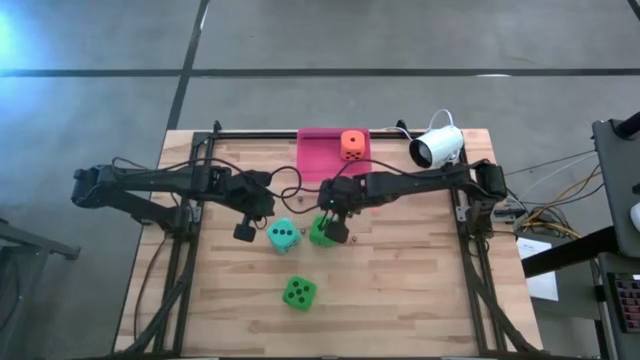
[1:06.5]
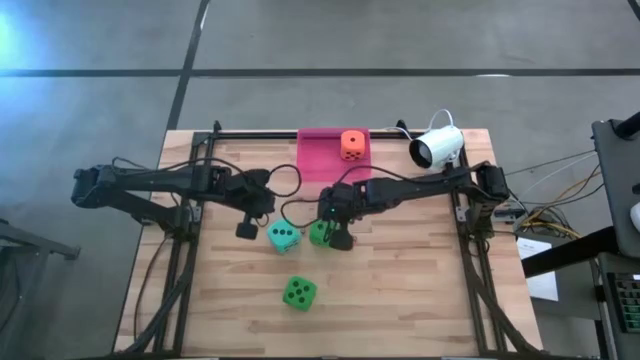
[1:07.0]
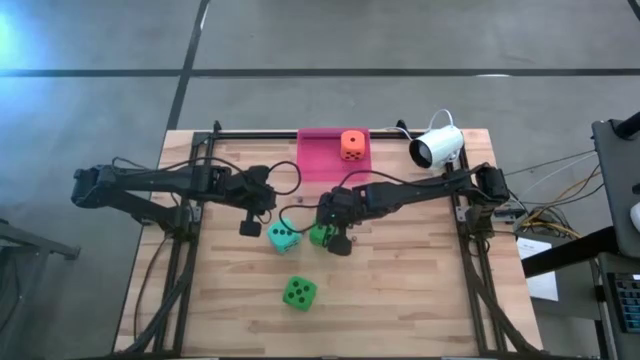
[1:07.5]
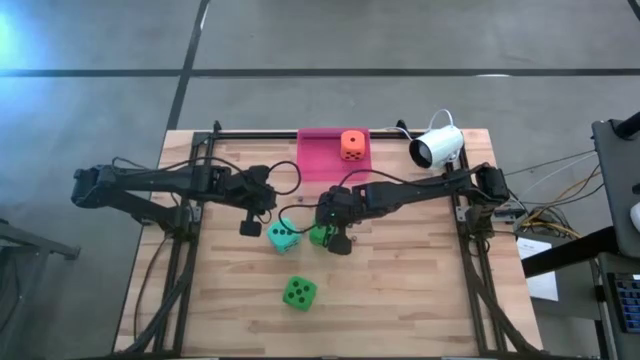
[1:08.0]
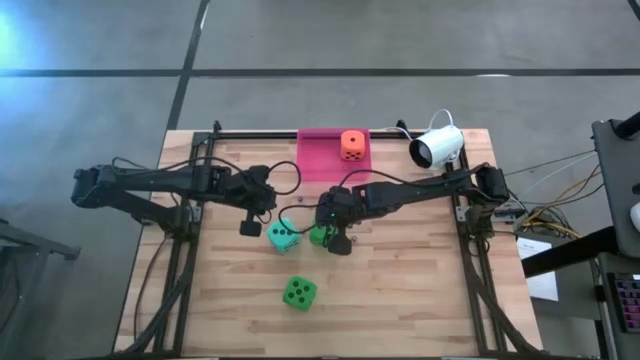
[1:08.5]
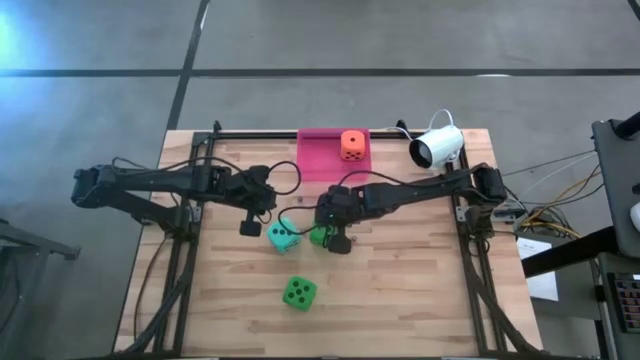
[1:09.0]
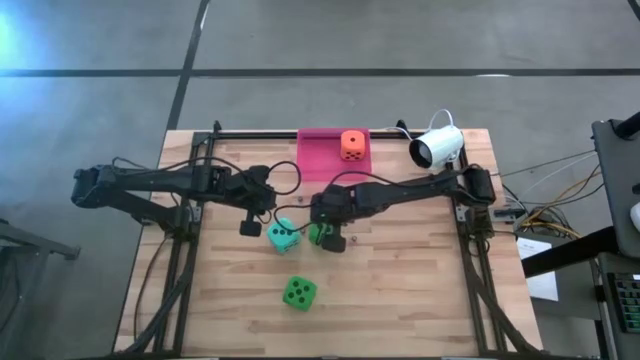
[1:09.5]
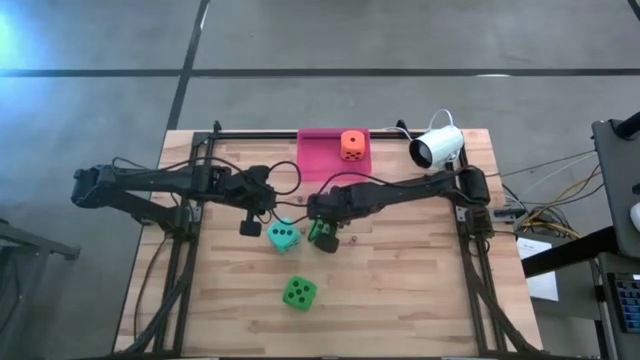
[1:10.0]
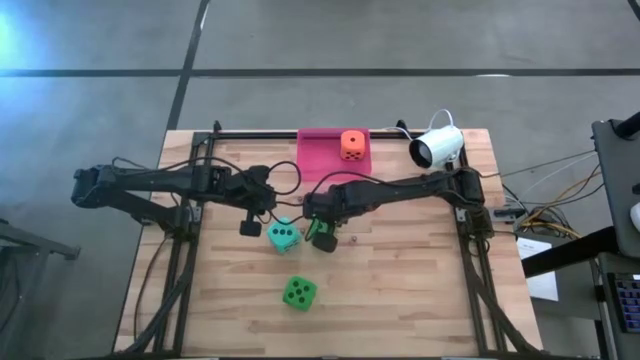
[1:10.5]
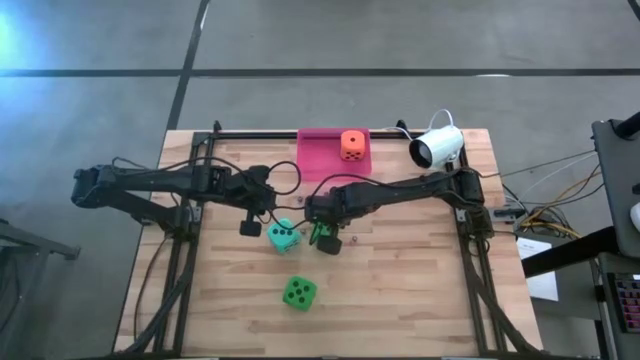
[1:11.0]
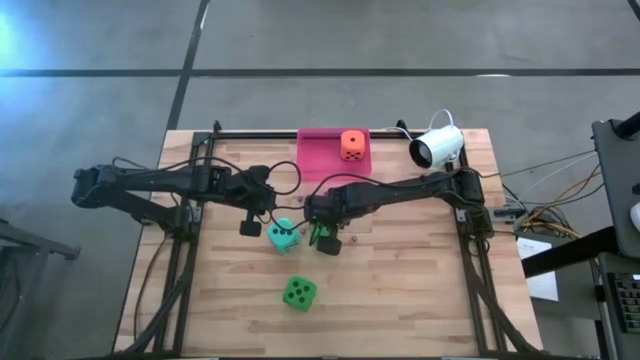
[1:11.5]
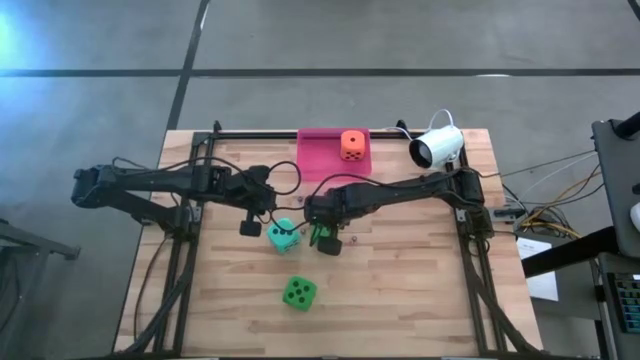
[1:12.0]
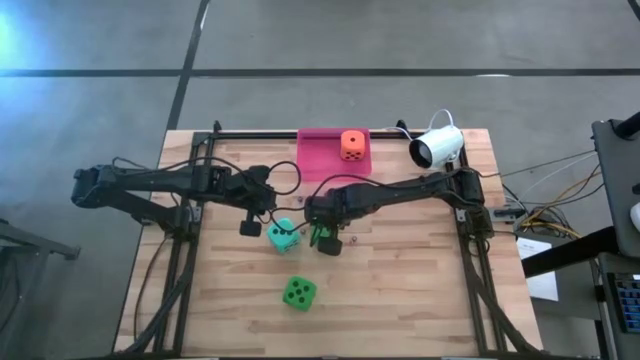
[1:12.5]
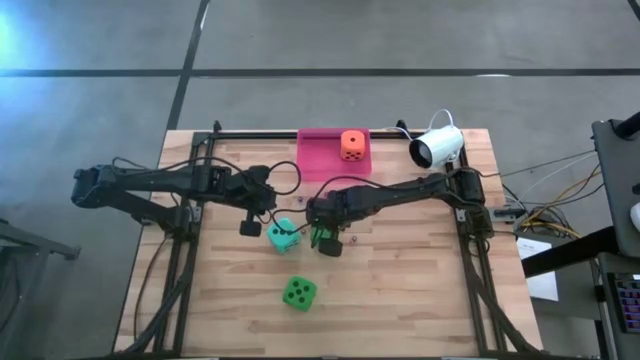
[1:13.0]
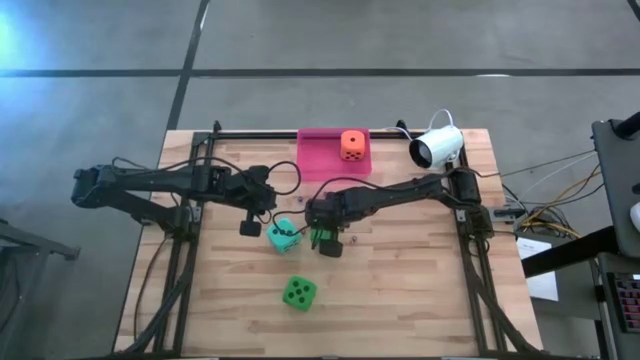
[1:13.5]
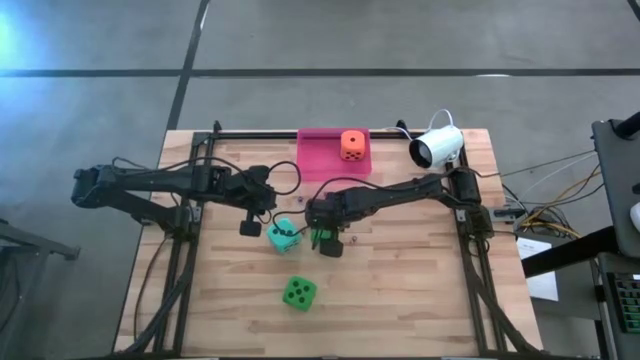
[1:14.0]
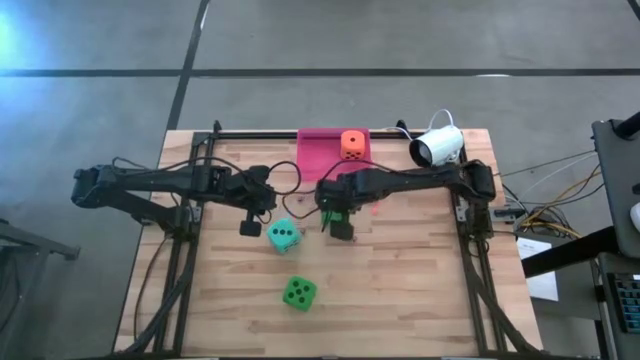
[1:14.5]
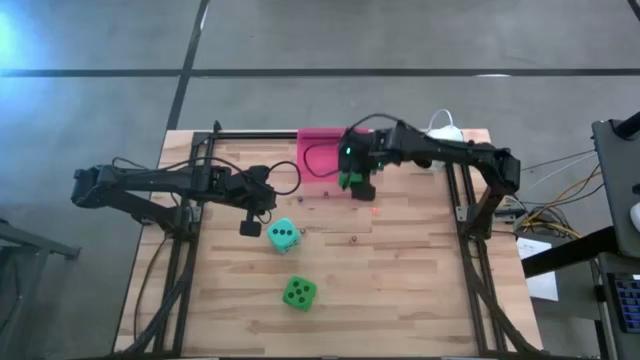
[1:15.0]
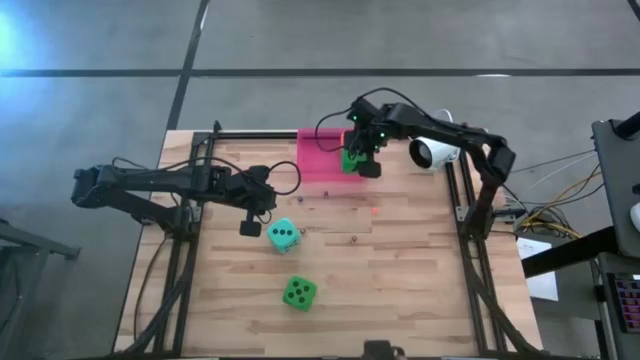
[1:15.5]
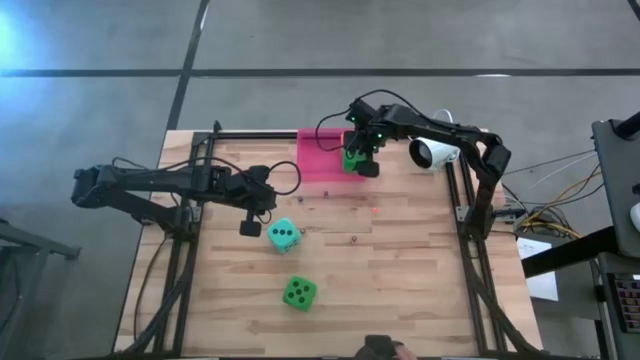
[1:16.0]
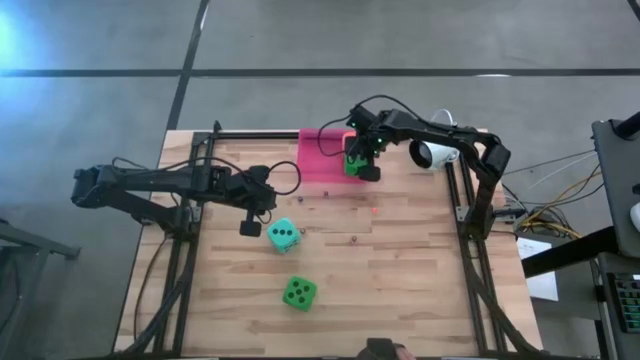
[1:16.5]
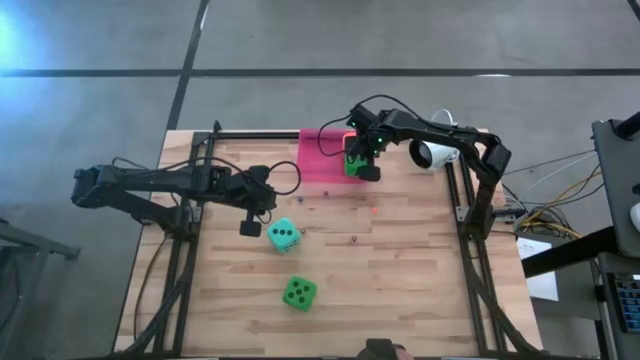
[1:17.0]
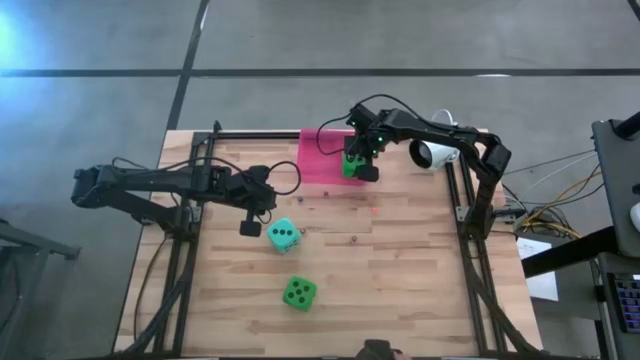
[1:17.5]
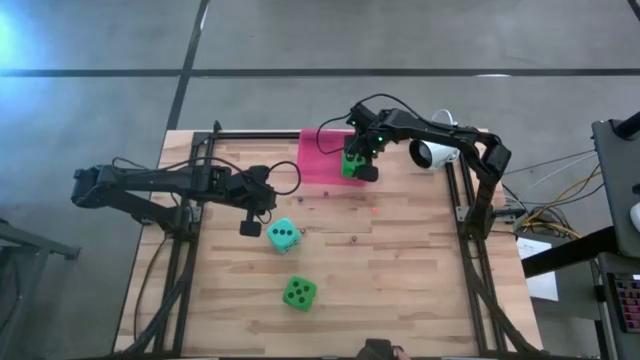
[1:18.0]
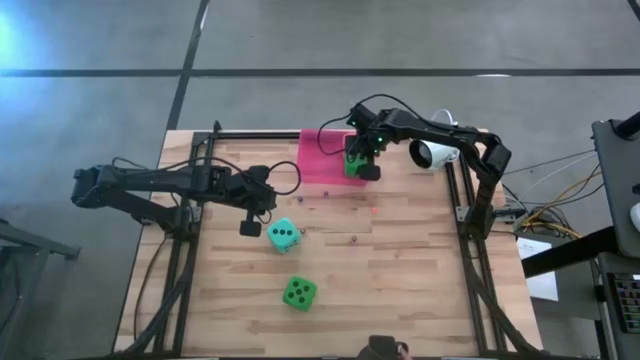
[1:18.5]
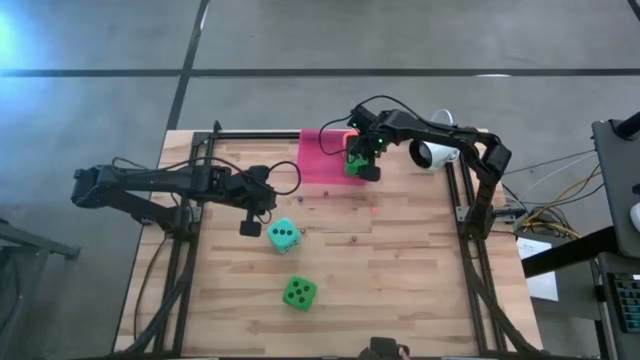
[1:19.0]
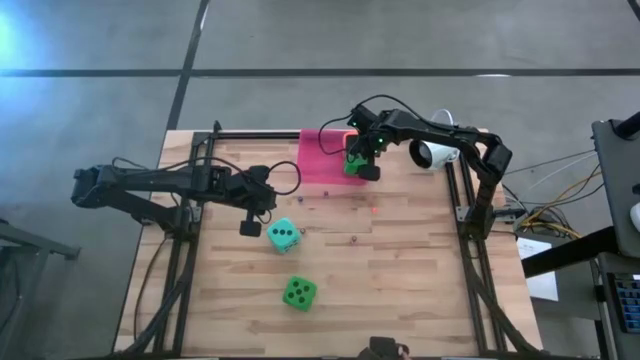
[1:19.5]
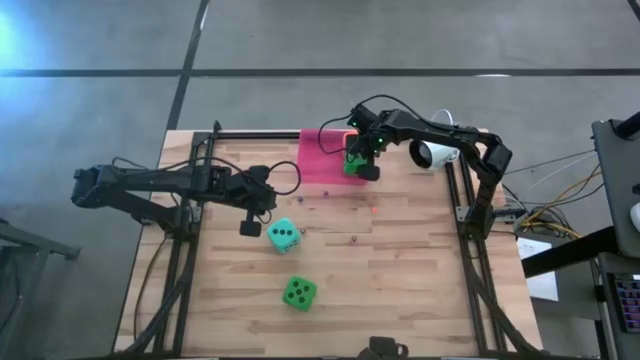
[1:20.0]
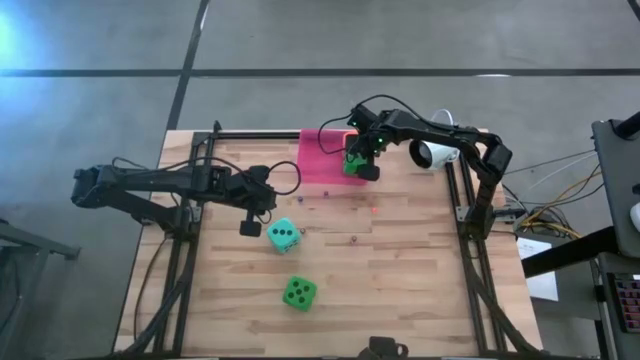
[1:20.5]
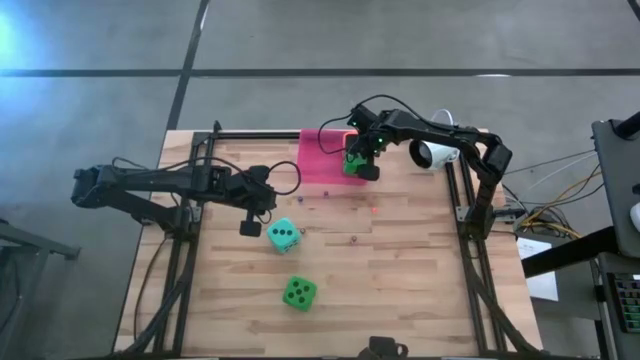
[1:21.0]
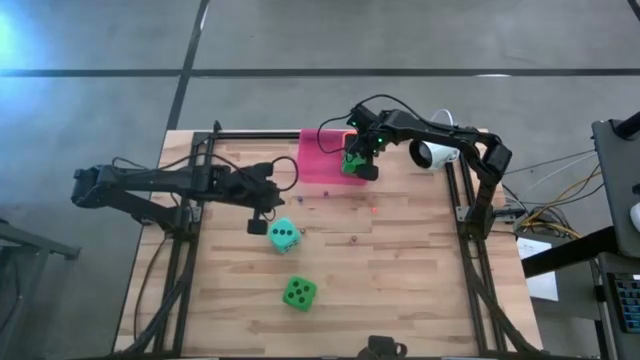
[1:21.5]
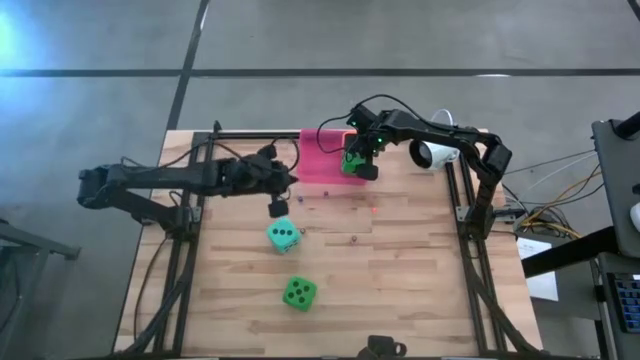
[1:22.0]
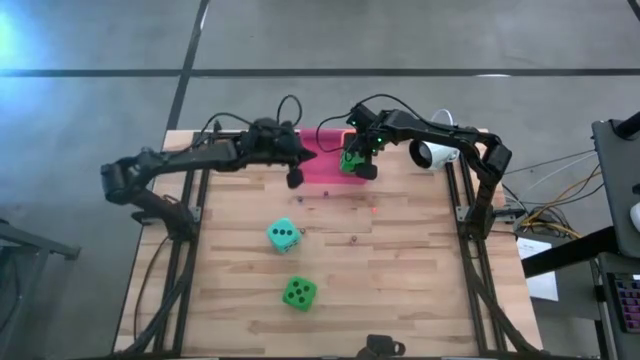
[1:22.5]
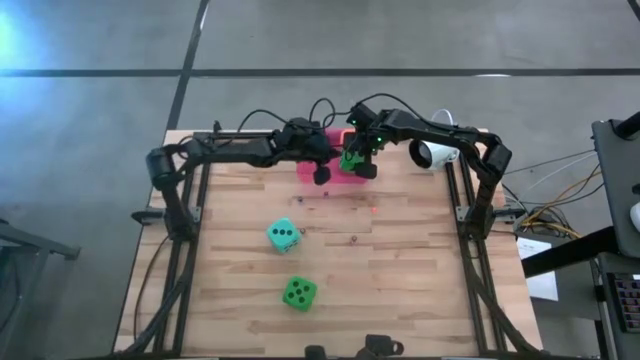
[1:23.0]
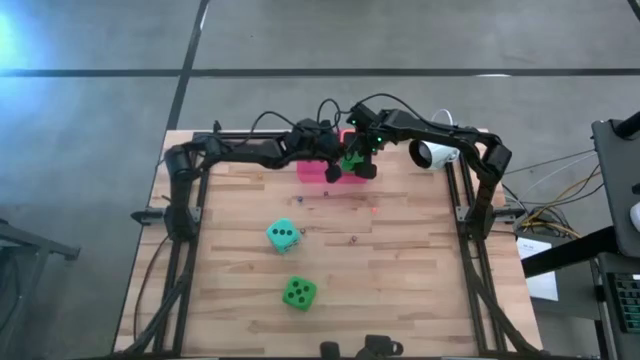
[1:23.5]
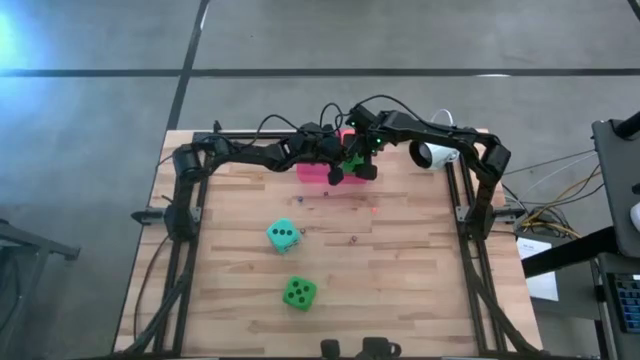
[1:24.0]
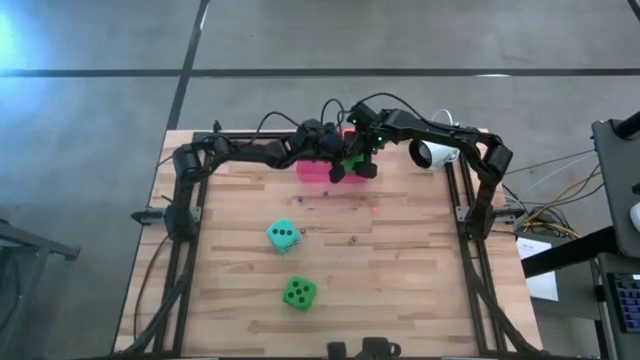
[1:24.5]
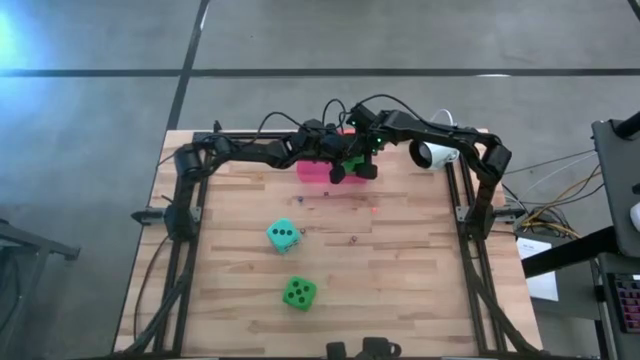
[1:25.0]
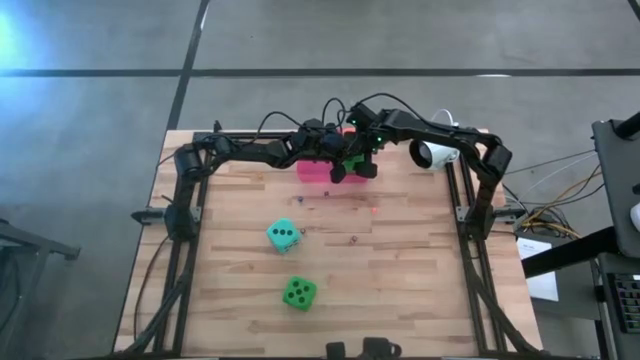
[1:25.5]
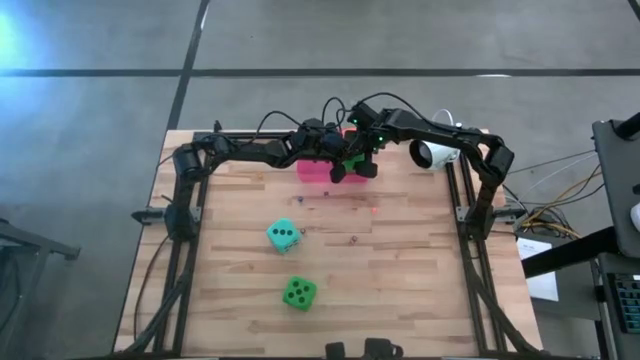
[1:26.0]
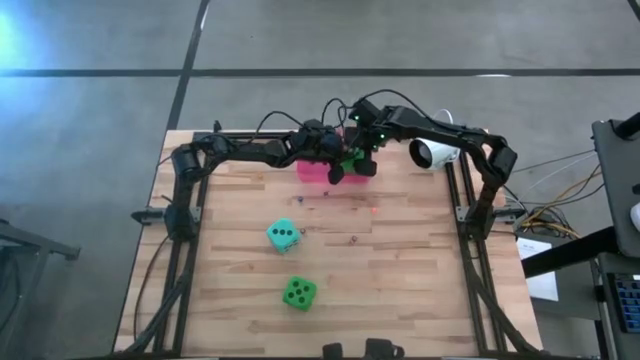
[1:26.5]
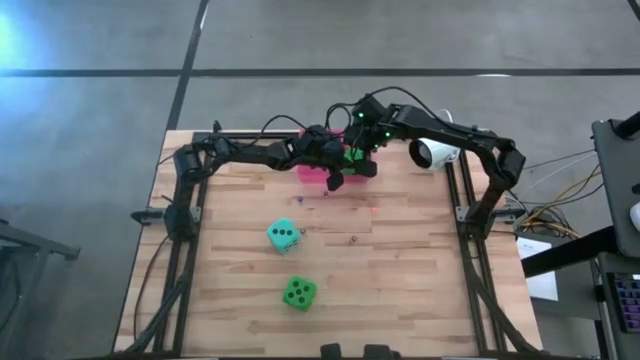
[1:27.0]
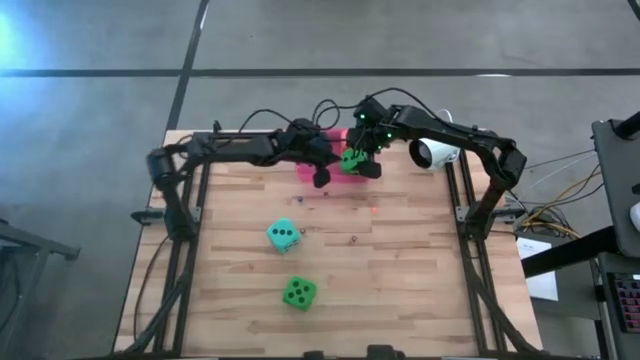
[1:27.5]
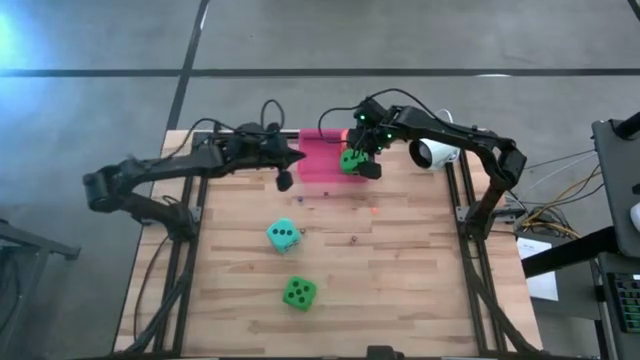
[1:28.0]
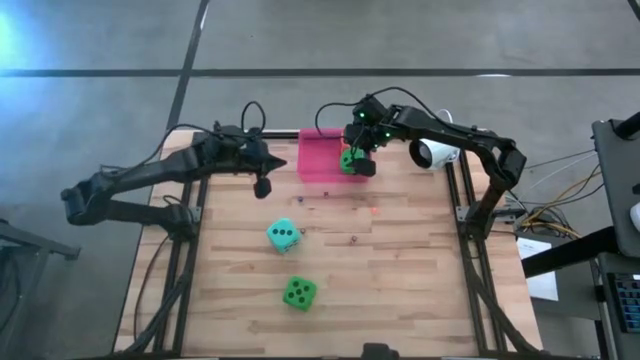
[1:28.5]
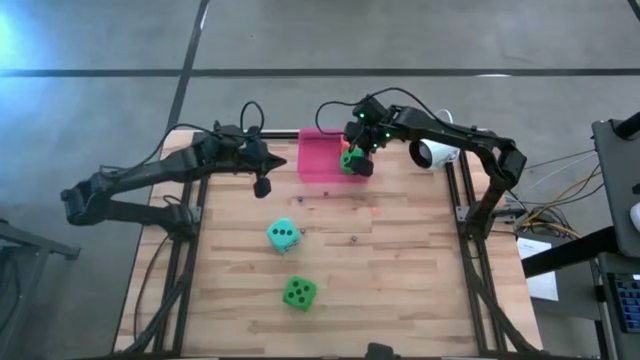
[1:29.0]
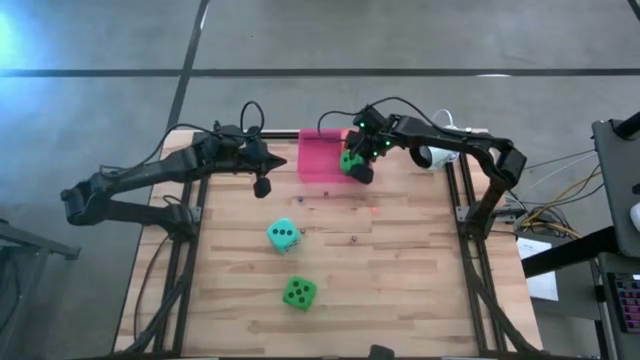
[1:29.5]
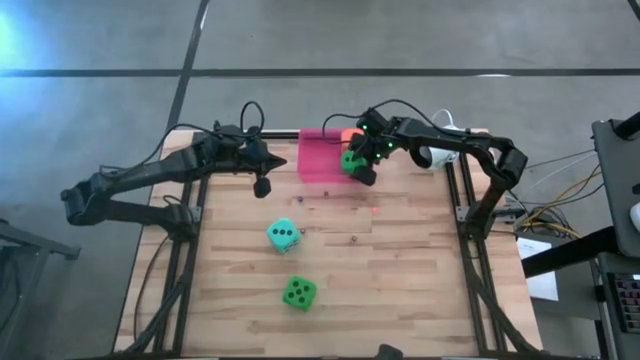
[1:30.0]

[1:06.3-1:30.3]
Task: Pick & Place Dice
Put the top large green dice into the the pink bin
